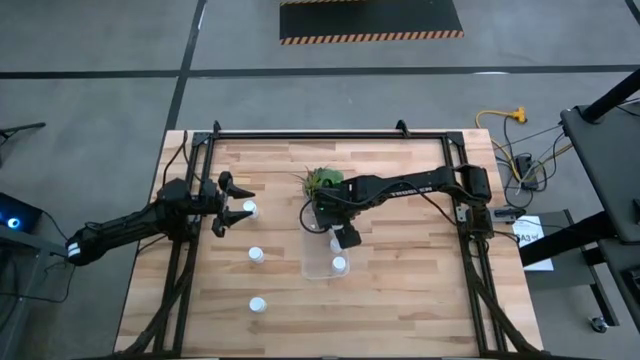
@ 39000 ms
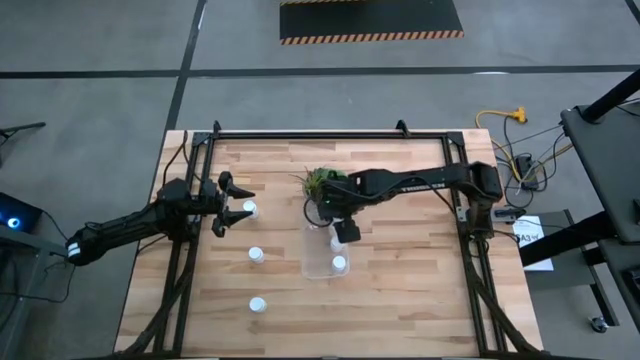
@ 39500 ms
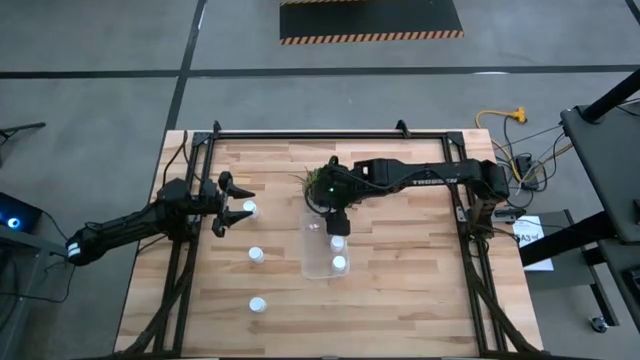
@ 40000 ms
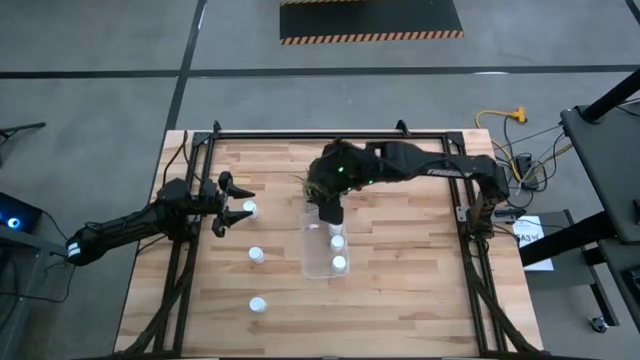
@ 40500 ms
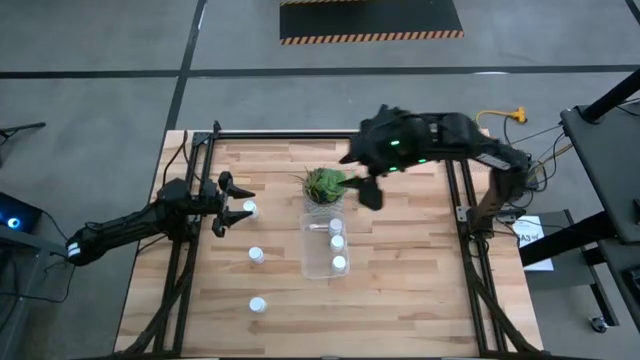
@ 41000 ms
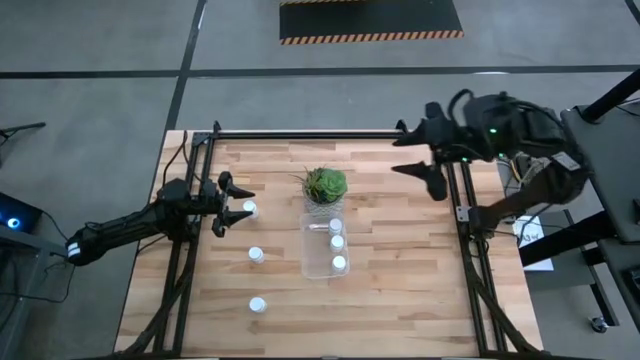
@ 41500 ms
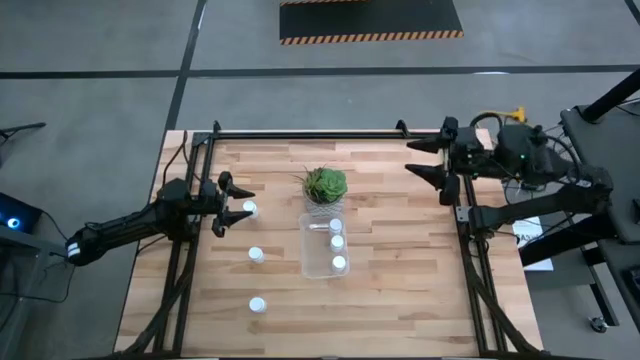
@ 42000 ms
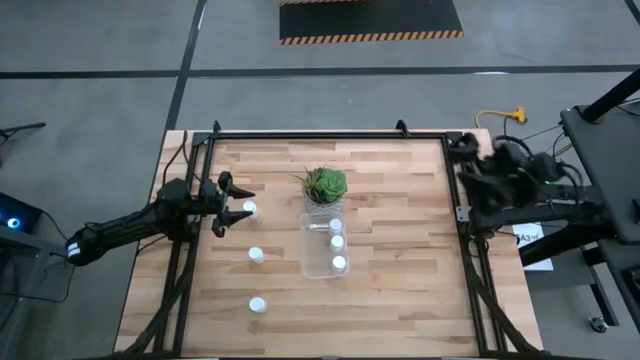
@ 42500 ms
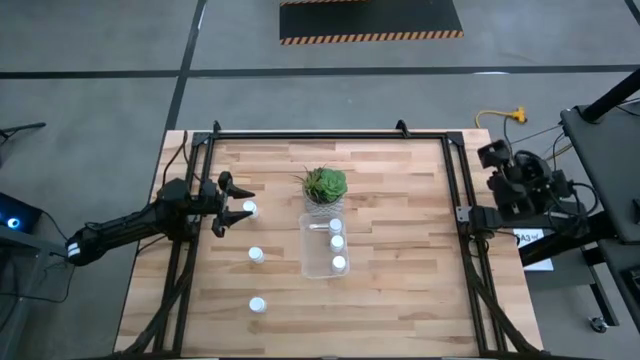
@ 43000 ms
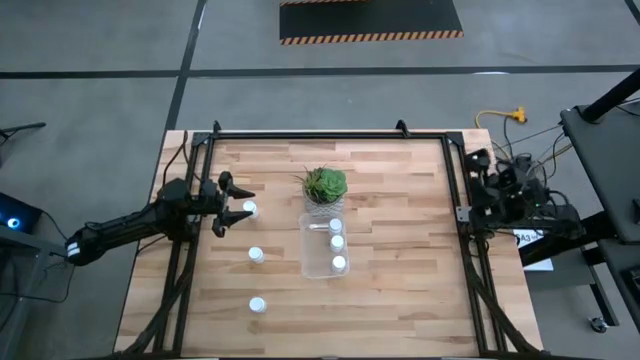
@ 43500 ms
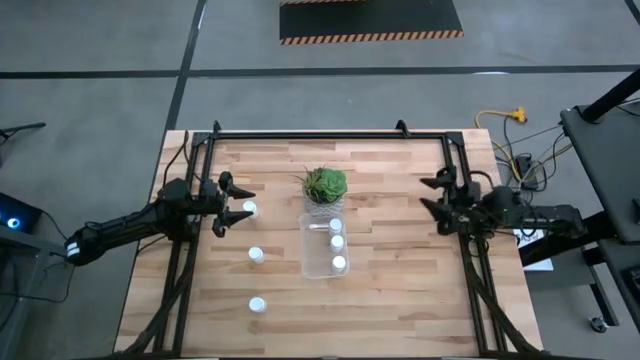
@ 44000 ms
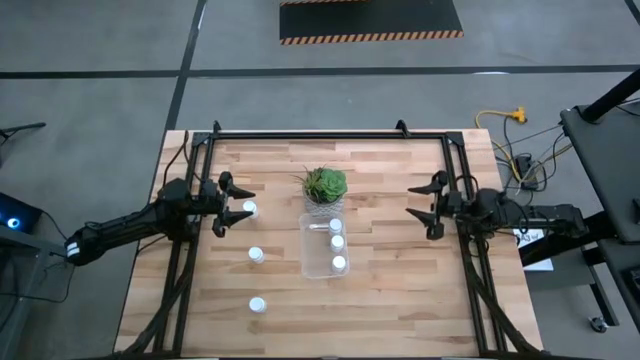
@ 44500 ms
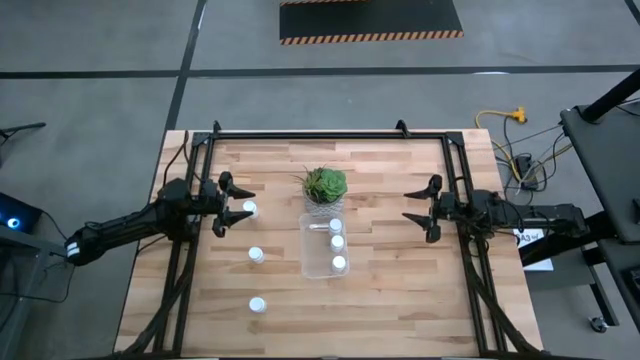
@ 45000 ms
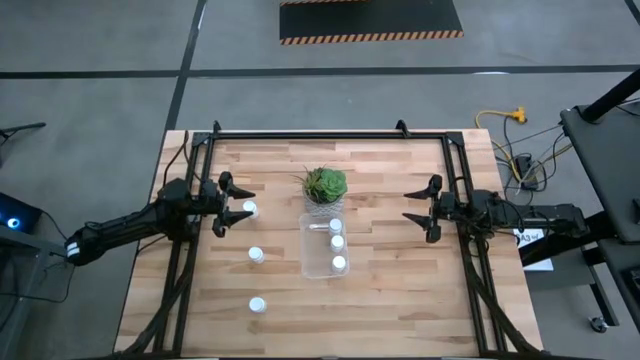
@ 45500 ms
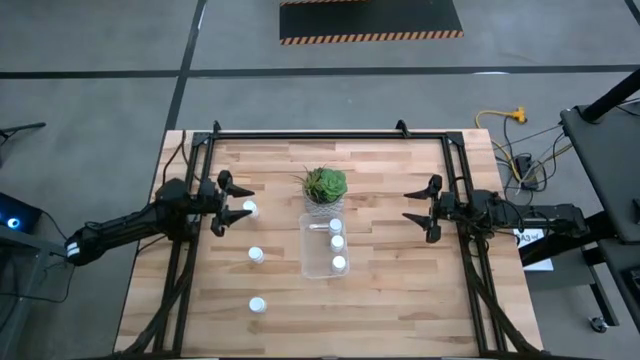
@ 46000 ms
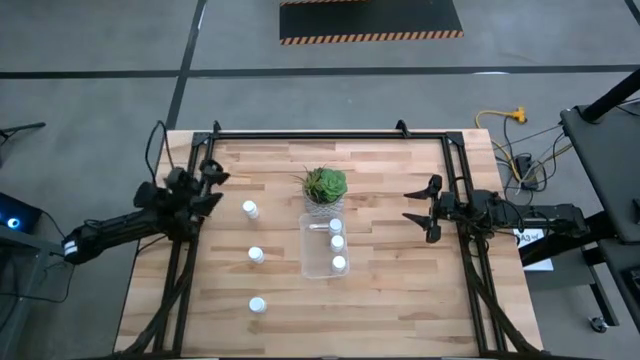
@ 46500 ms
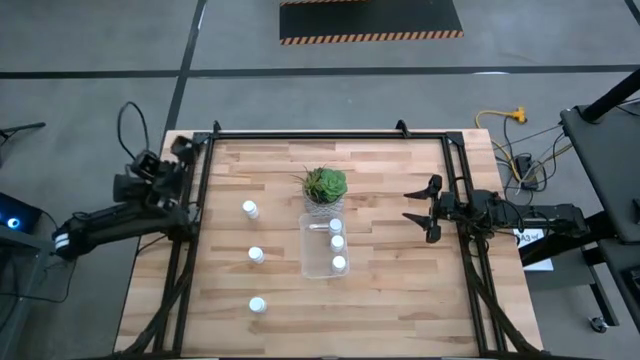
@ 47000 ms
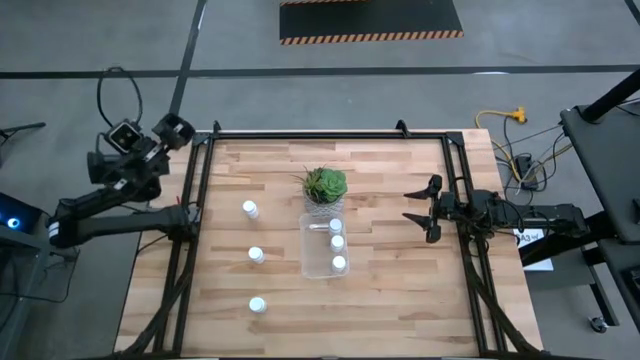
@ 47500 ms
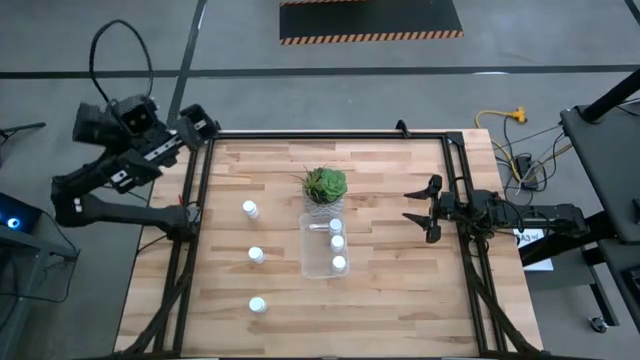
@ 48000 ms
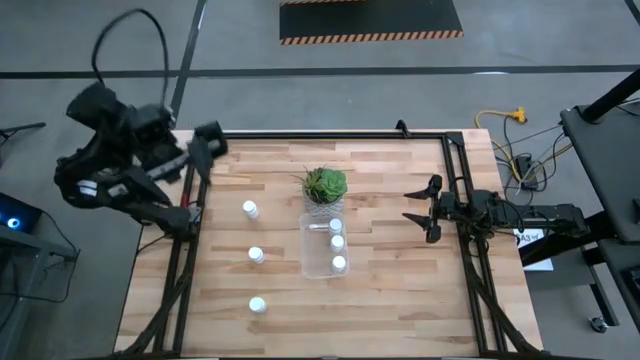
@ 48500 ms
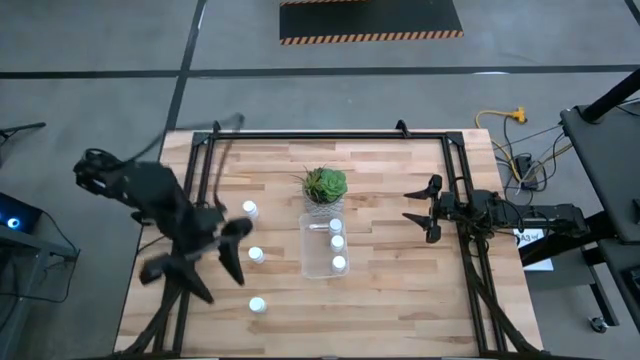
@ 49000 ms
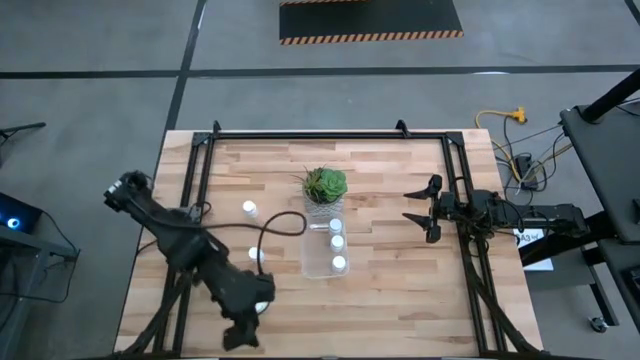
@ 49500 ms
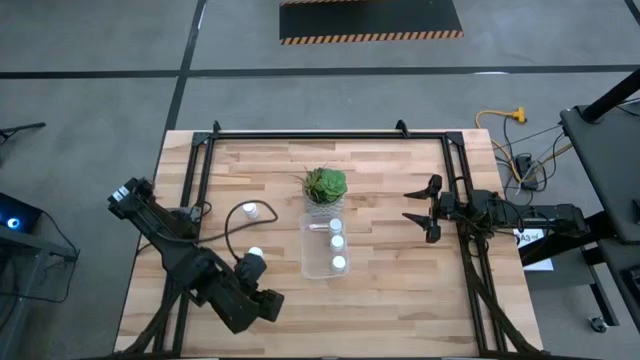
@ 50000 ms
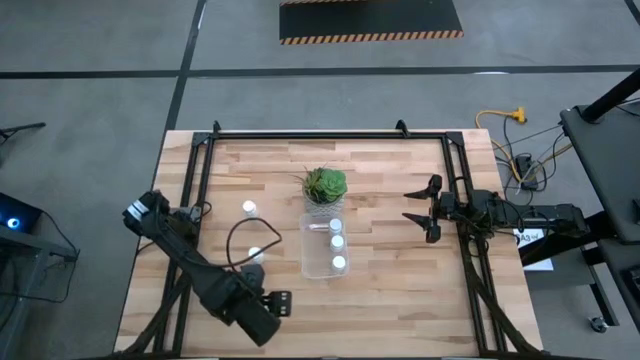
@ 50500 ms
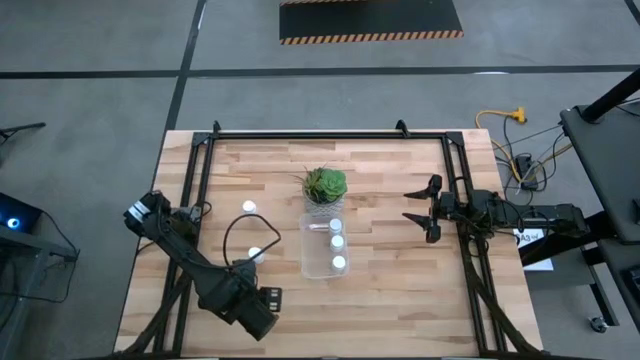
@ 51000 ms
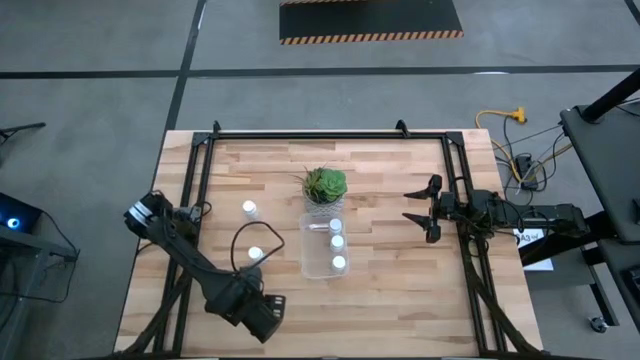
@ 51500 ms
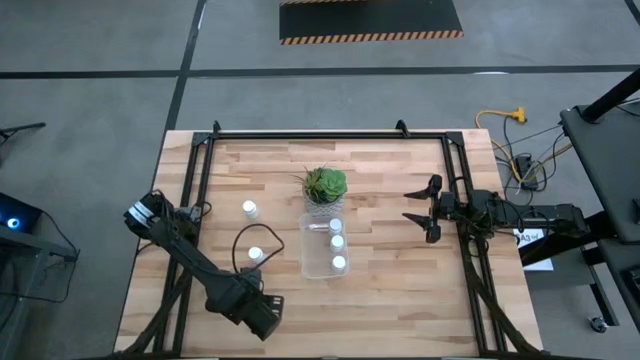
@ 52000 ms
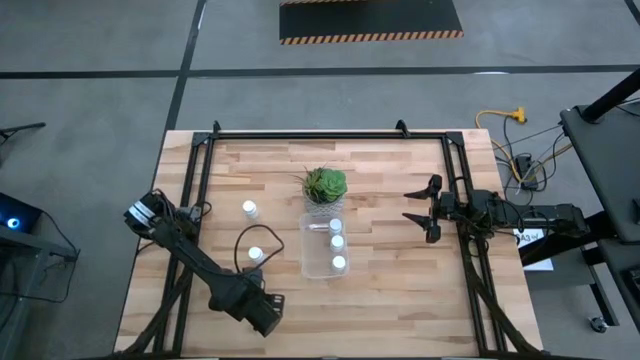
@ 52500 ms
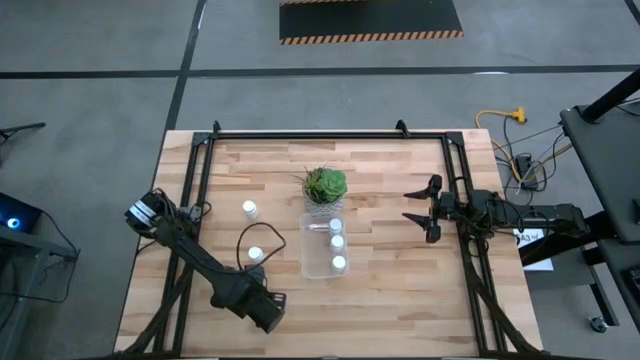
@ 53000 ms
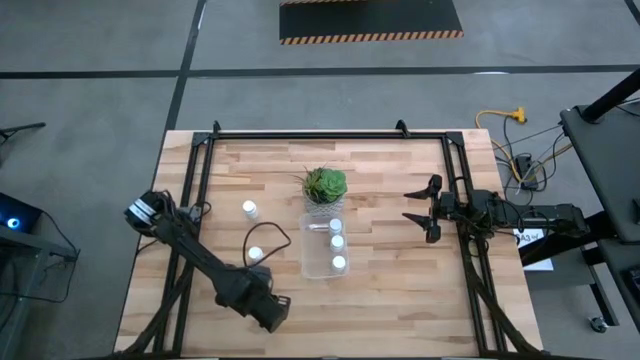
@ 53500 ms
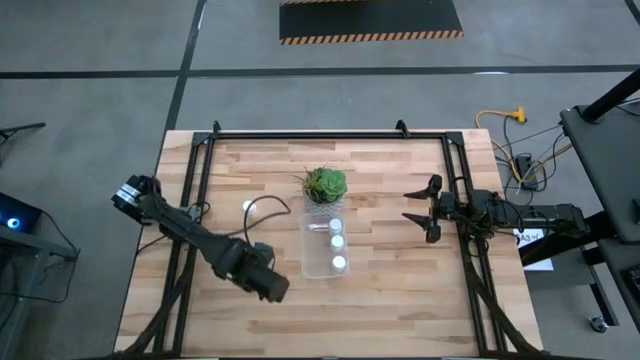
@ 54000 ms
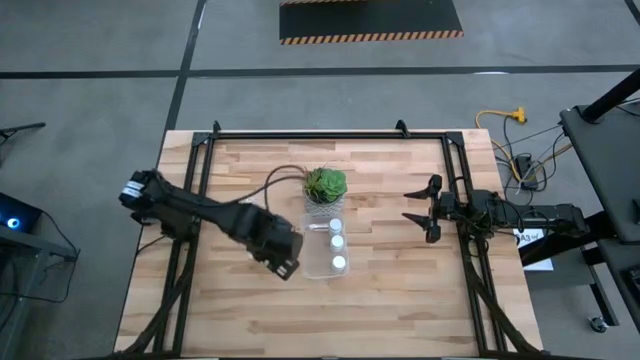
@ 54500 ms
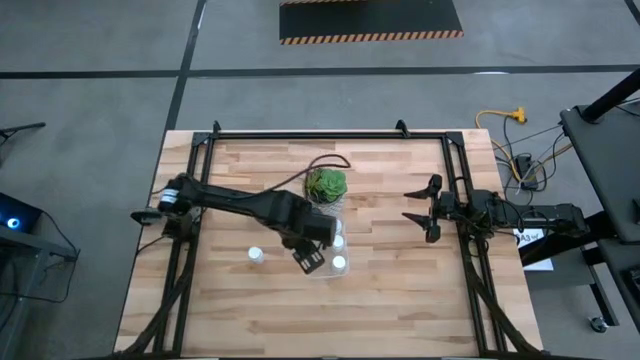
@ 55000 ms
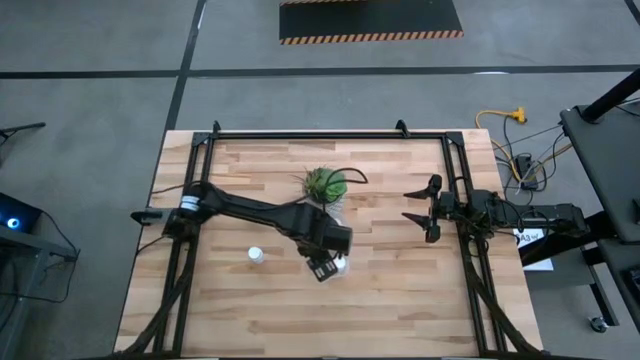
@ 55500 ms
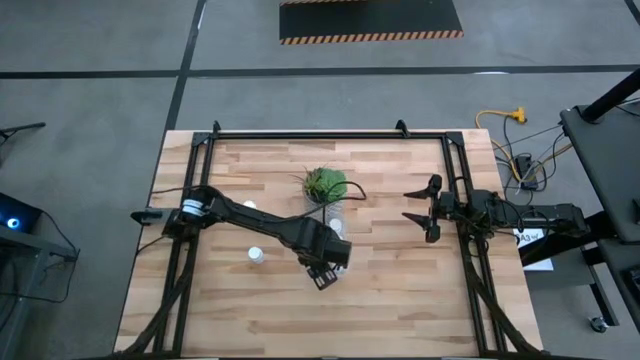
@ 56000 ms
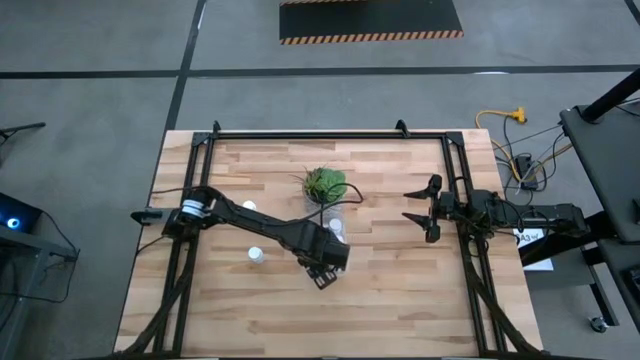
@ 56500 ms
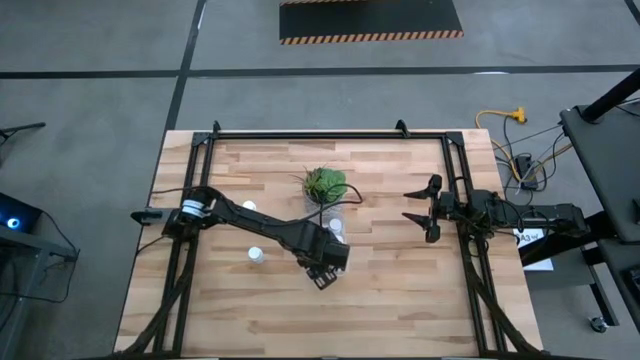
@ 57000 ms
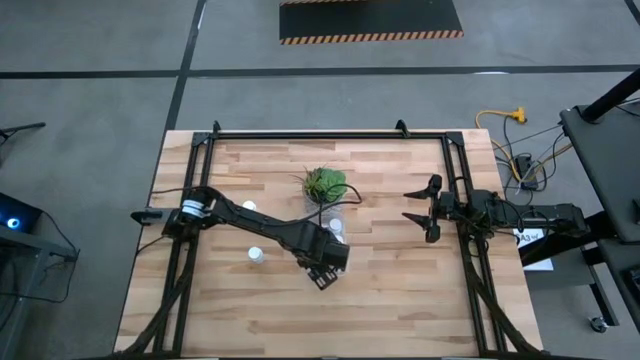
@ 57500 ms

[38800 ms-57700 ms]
Task: Pick and place pill bottles into a basket
Put the bottom pill bottle into the bin

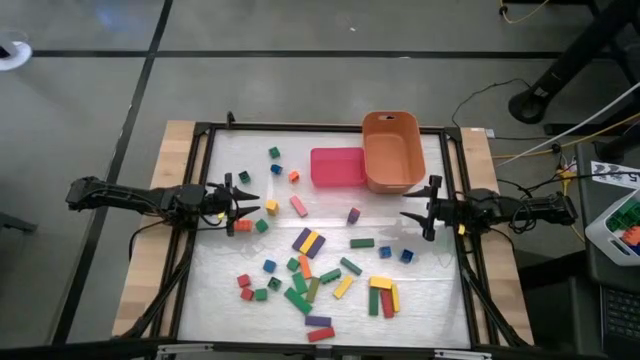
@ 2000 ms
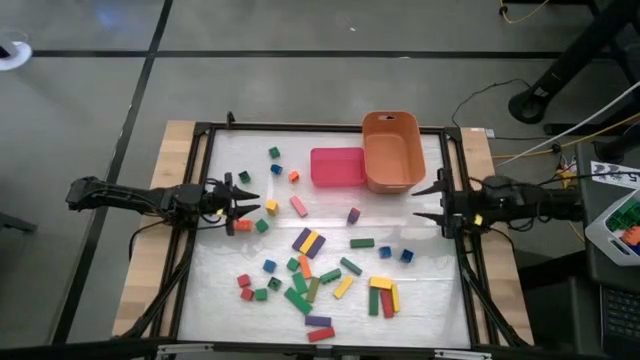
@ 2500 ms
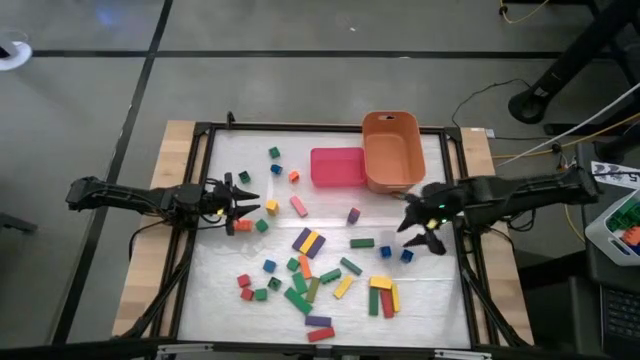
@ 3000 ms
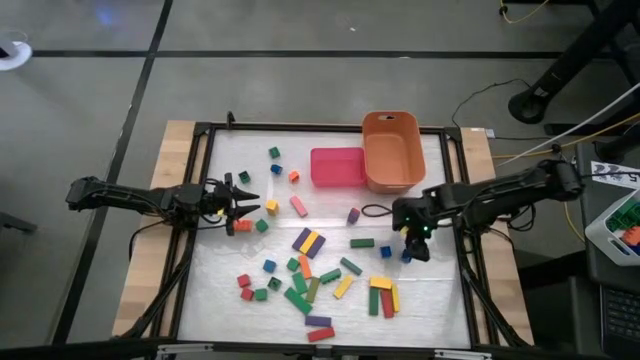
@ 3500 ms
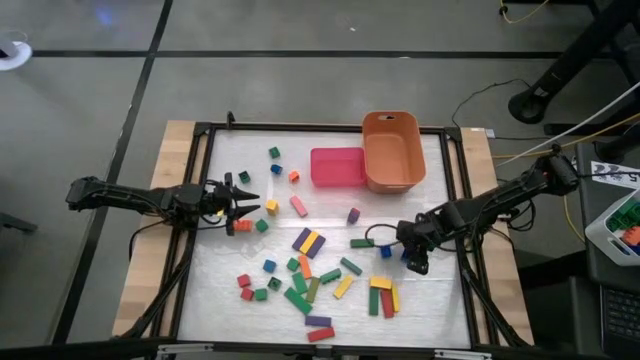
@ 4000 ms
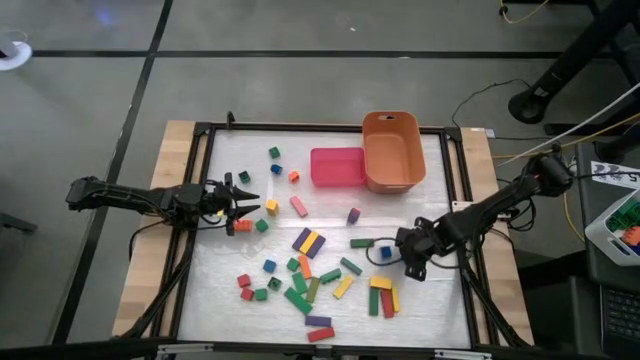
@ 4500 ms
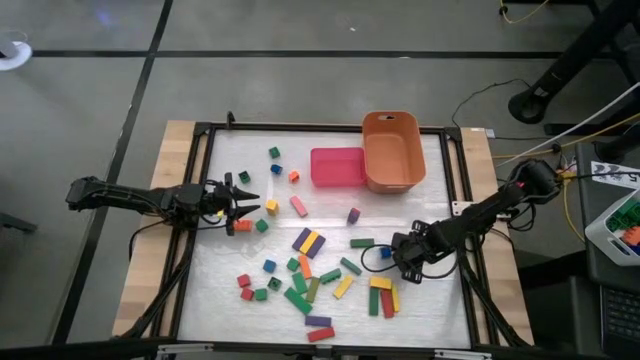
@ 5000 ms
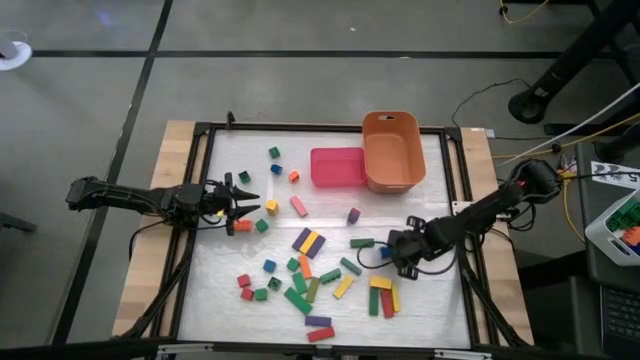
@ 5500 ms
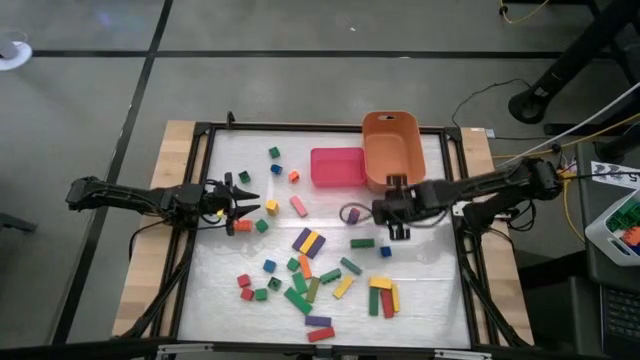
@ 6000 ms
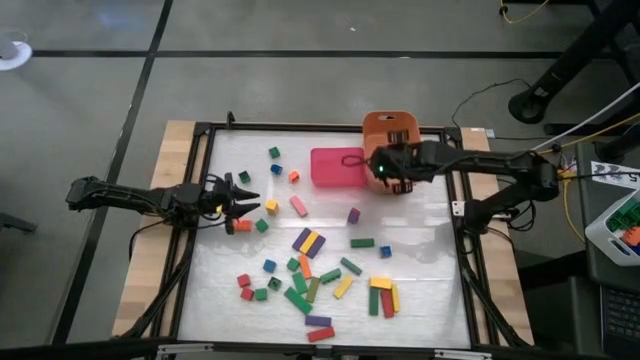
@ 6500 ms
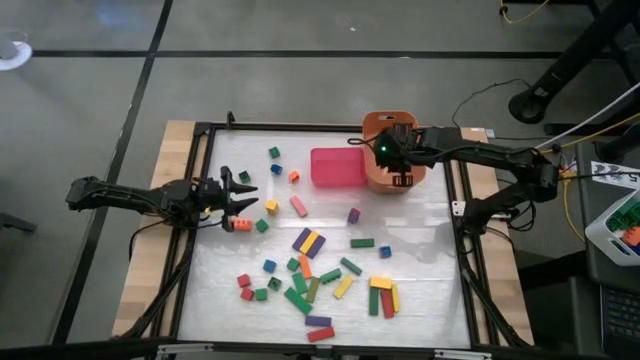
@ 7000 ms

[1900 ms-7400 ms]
Task: Sort blocks by size
Put the small blue game piece into the orange bin
